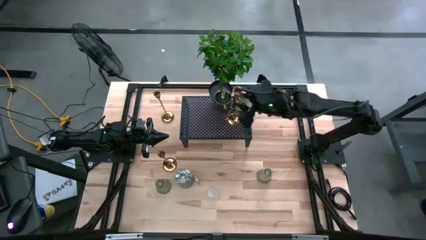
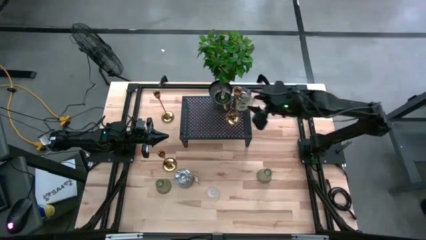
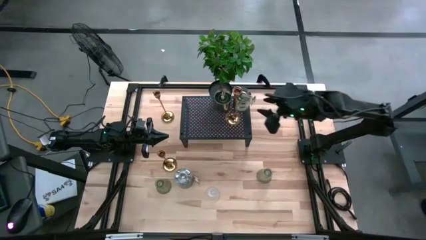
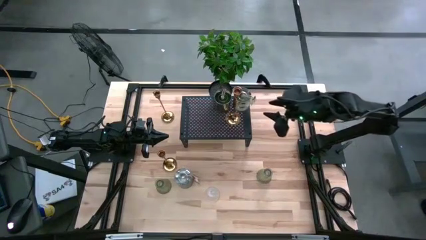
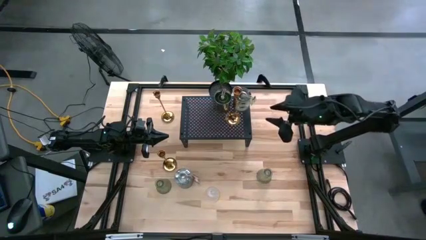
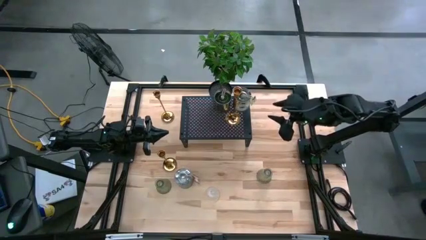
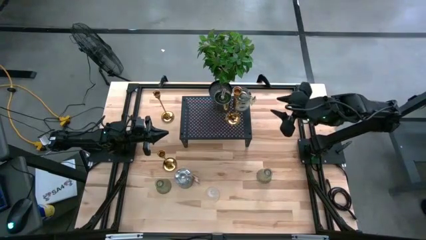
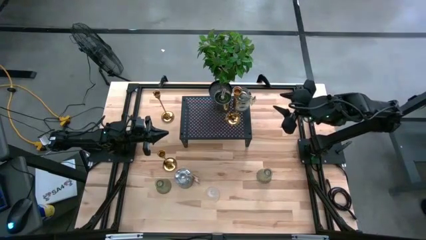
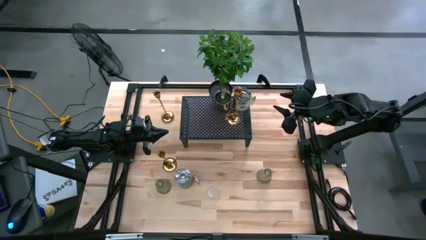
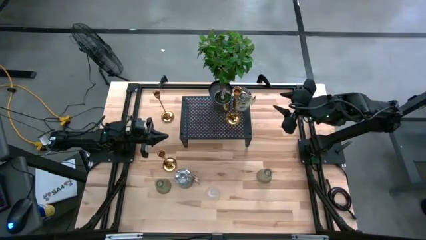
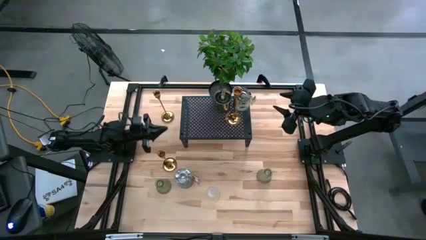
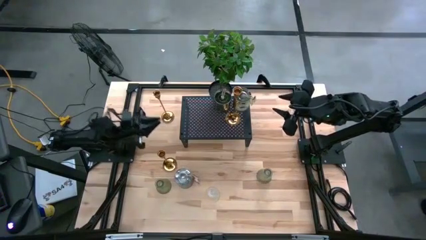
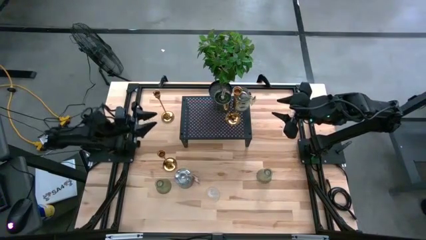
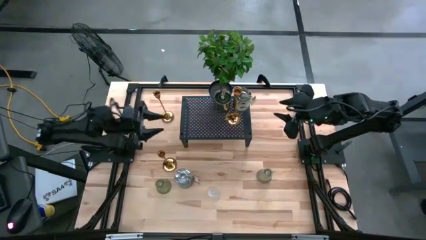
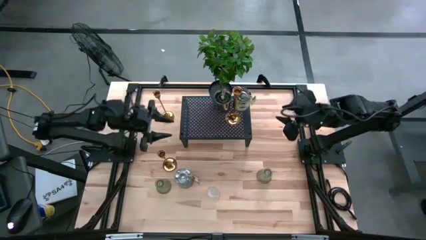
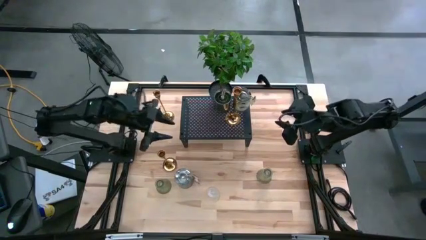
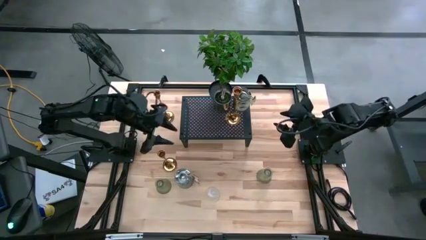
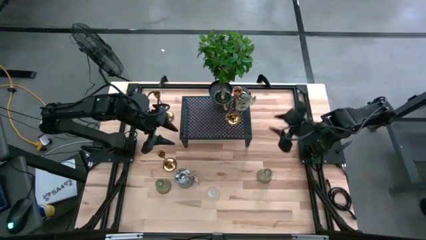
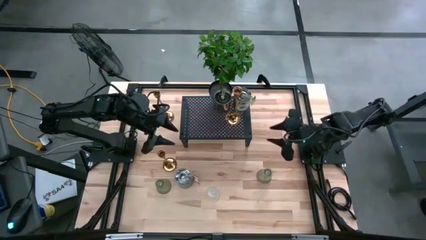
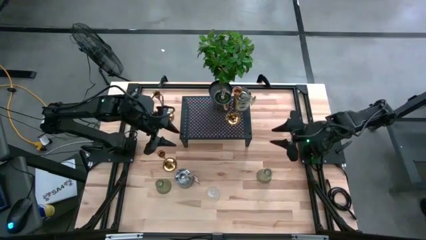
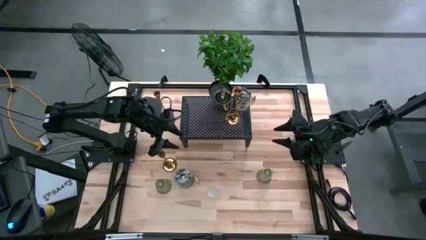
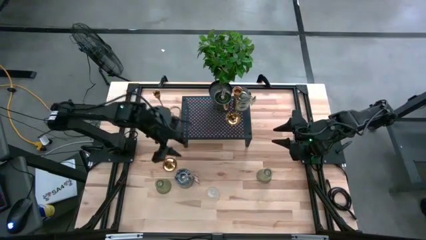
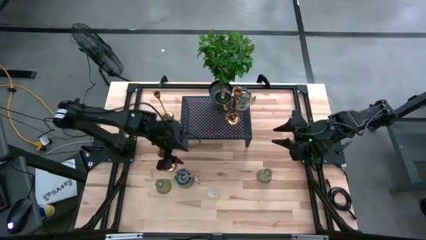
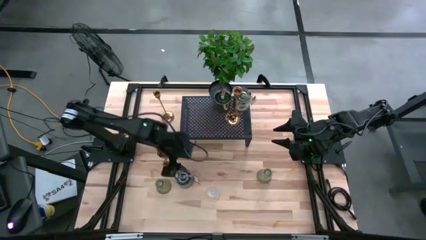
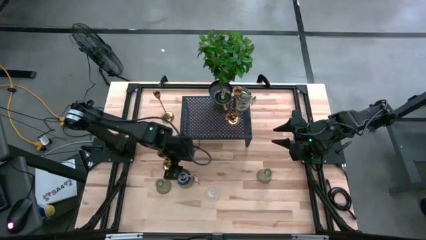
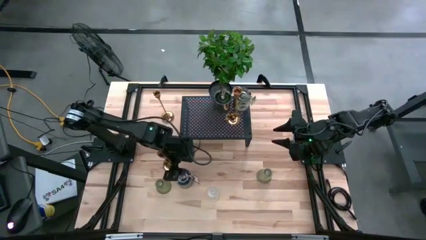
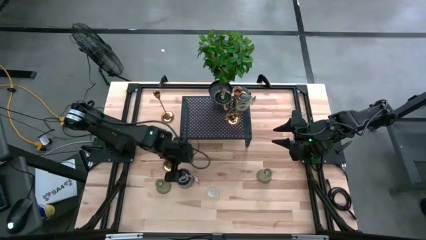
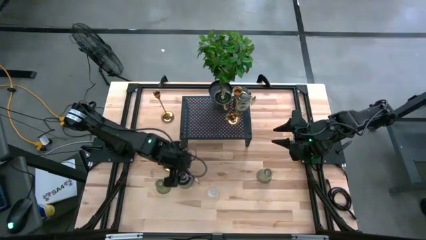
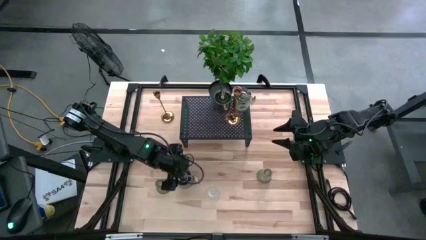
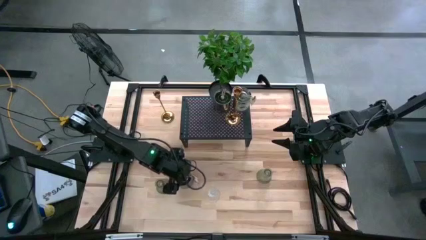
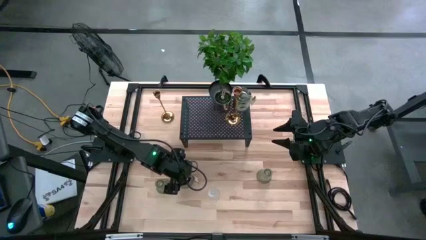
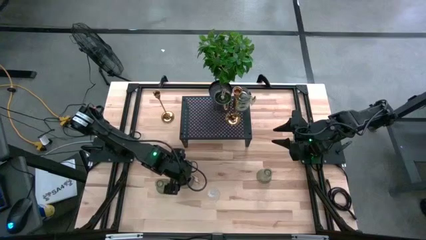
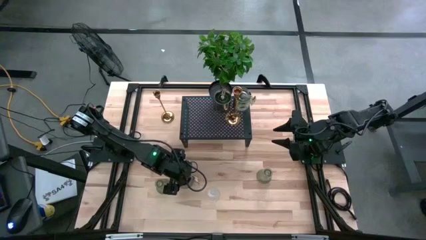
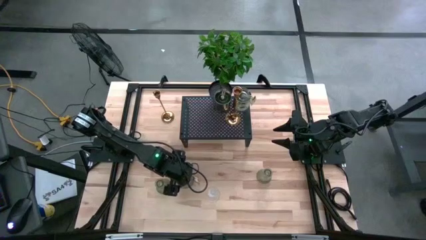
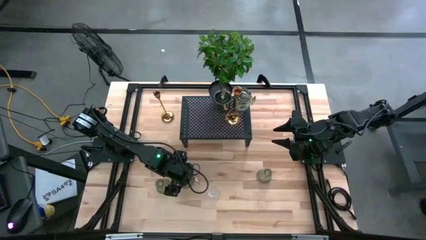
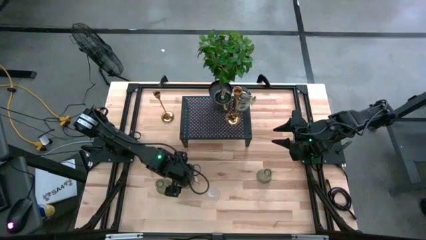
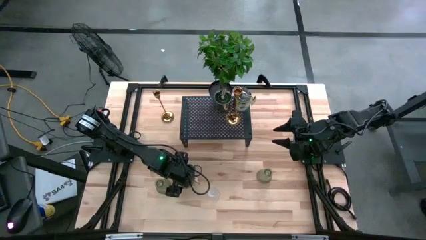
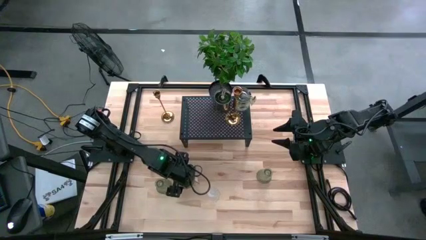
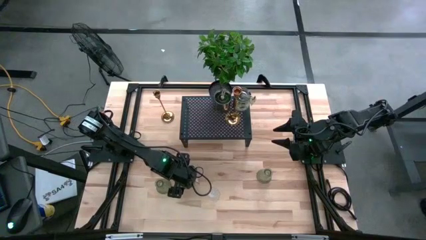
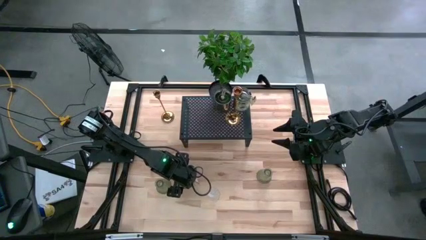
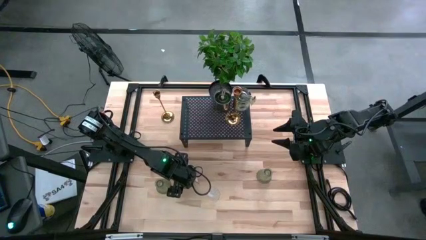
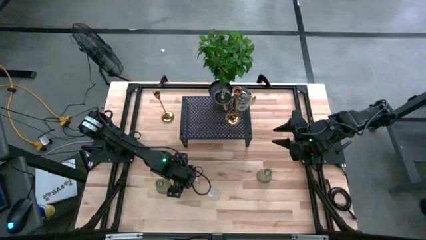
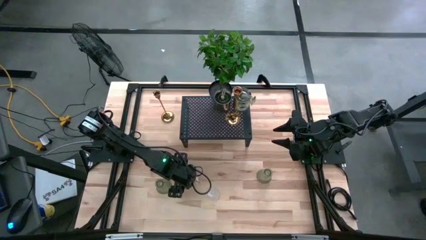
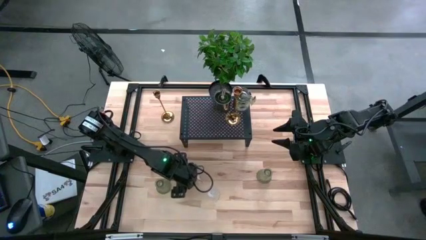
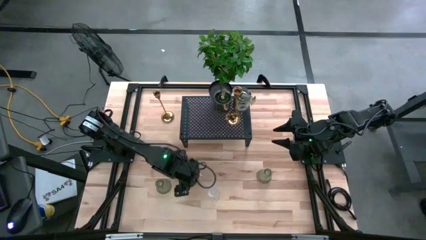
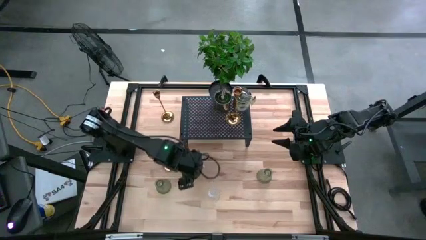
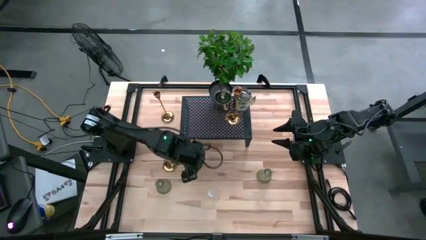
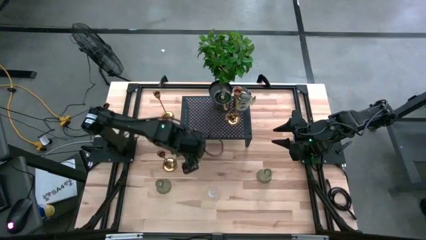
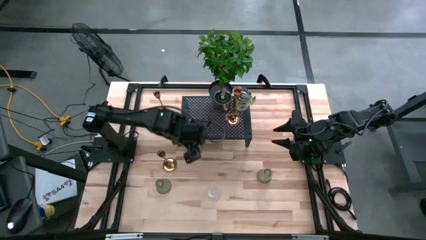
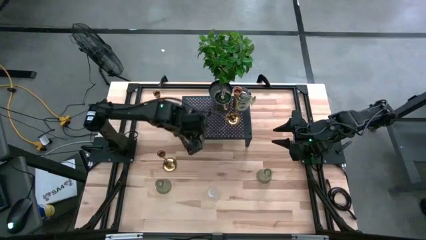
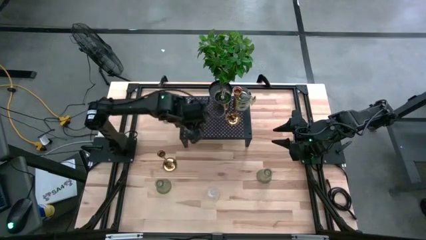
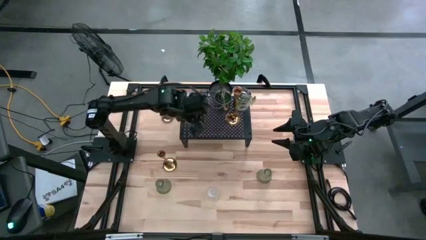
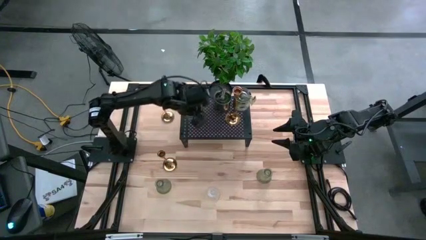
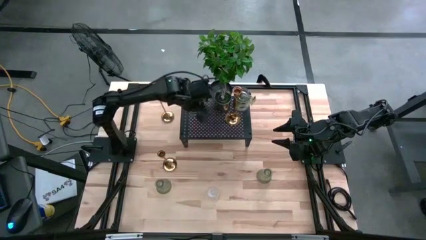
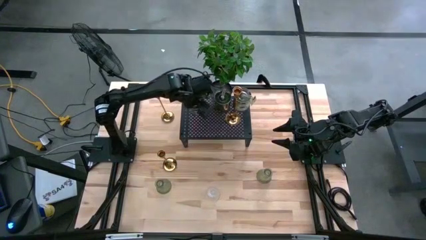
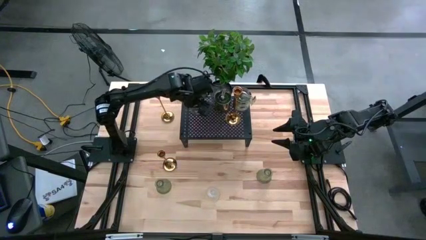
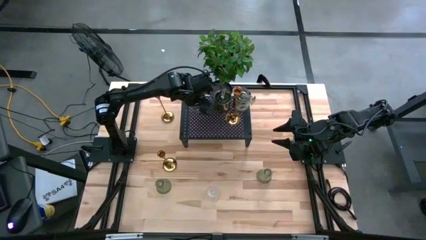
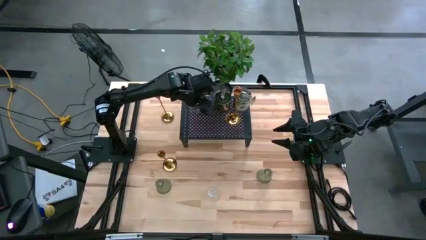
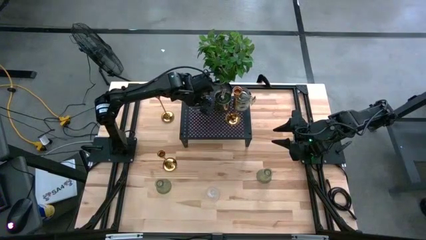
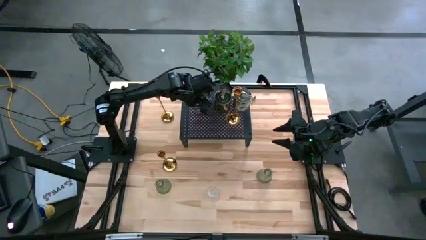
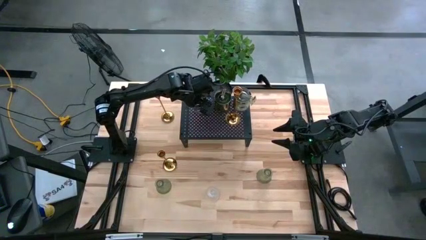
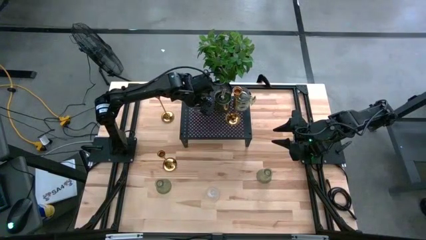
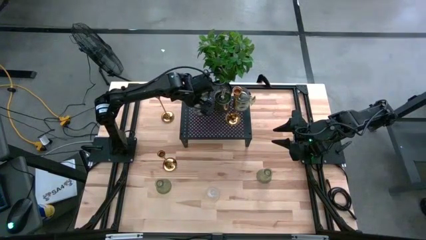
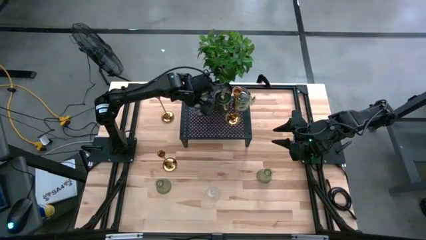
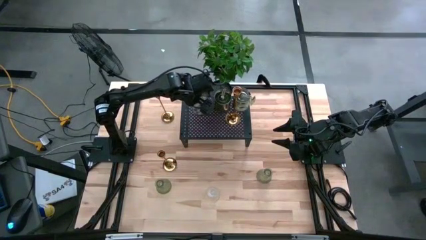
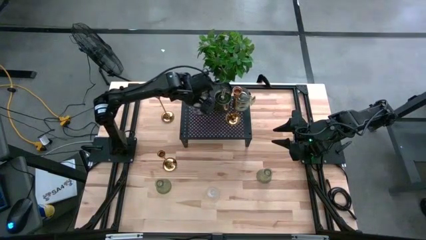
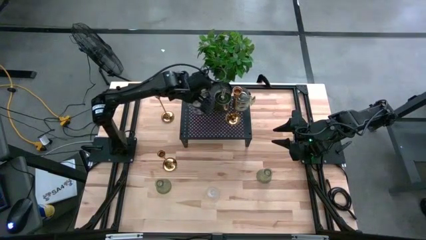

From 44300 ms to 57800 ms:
Task: Pick & Place candle stick holders
Put the silver scented candle on the shelf aligned with the other silver scented candles

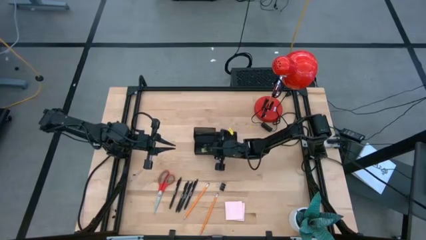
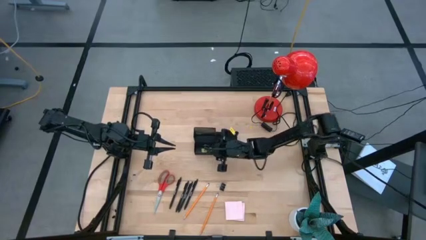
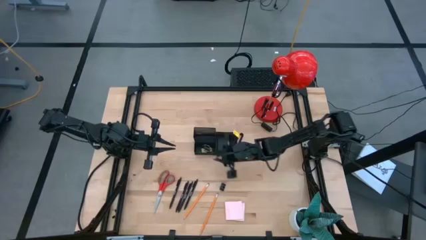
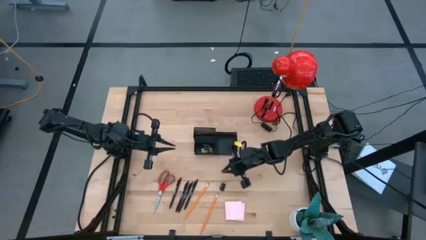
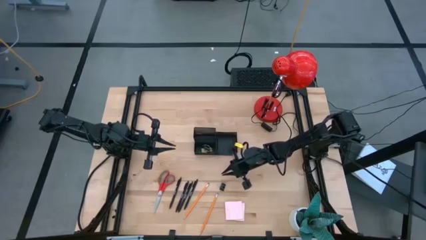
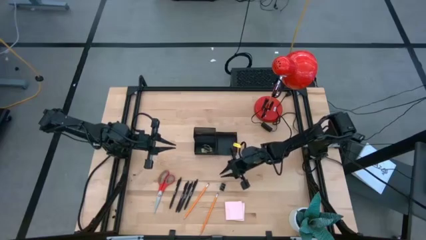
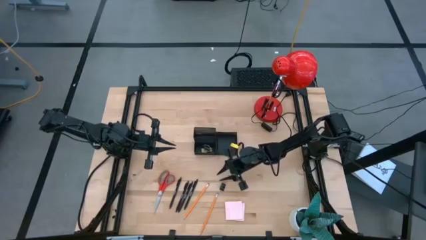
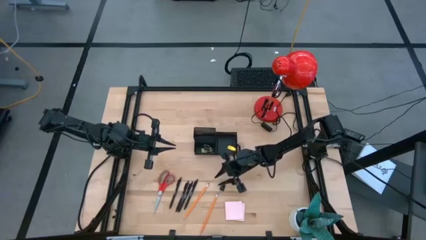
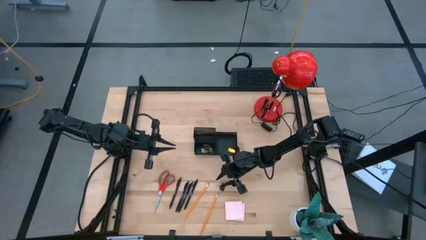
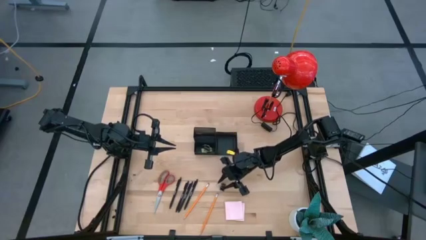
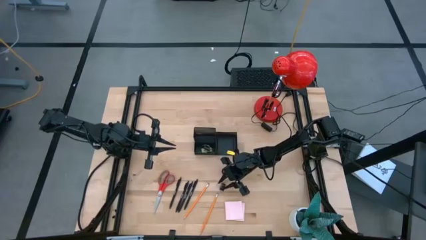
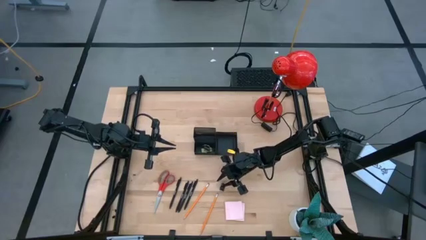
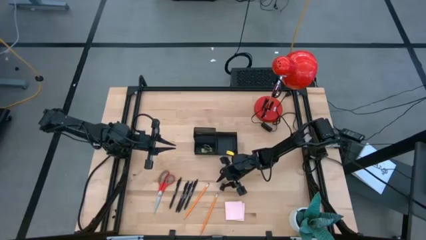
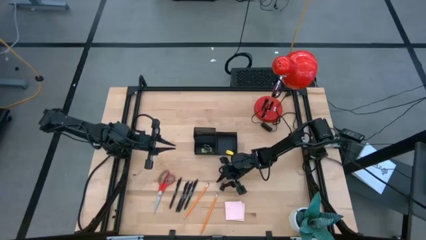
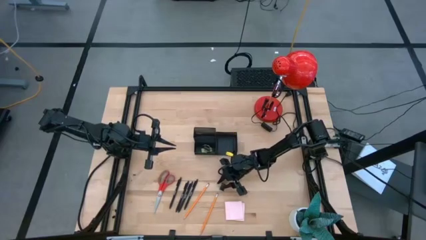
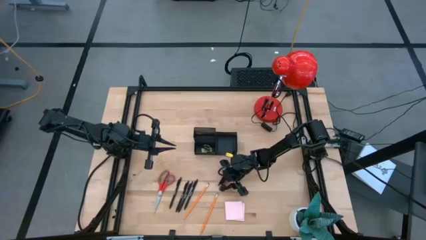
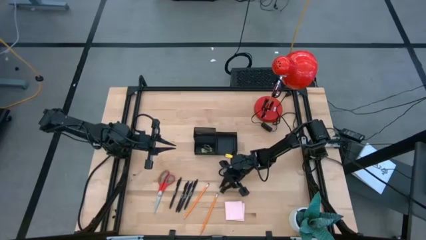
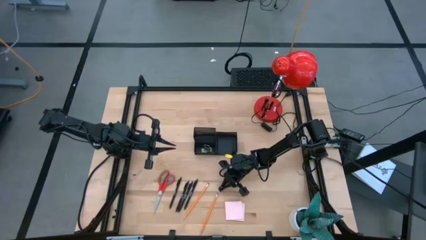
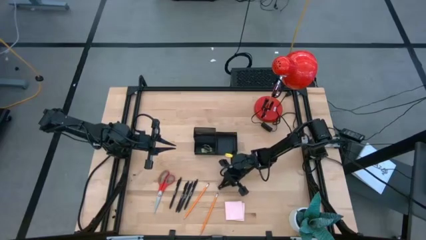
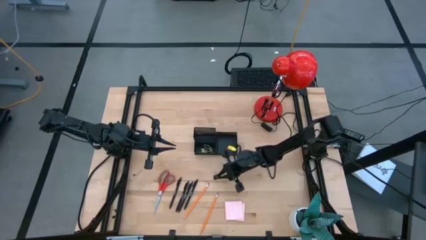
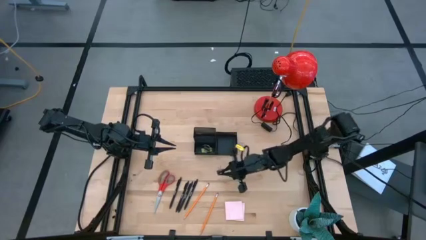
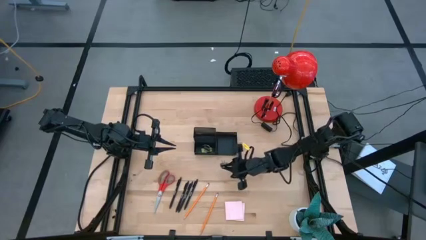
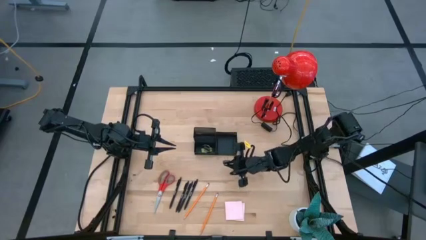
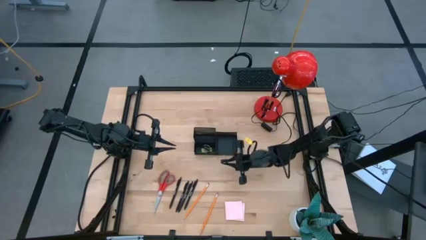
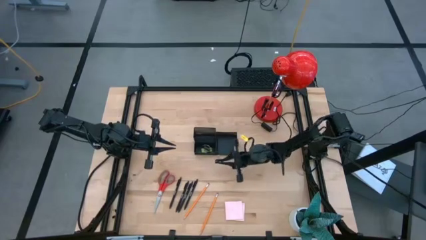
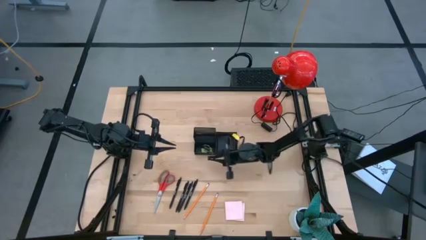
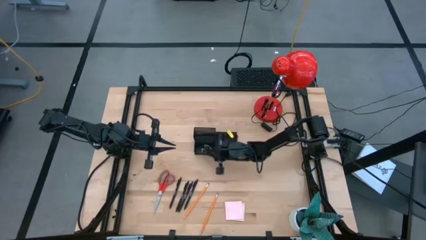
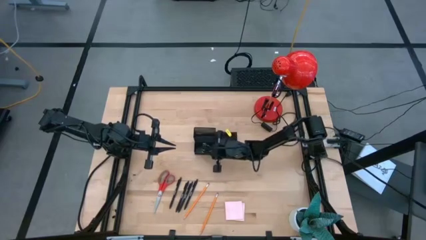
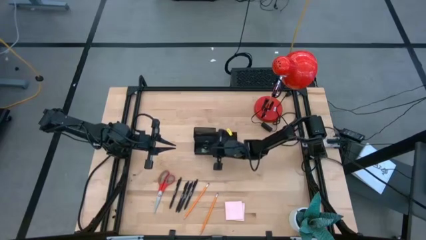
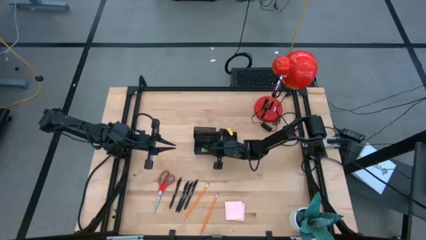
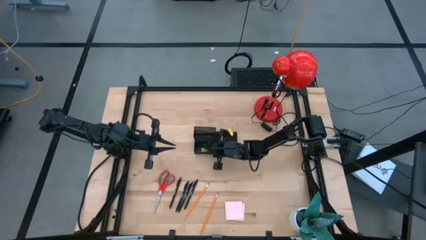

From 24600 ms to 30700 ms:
Task: Pick and place office supplies into organizer
Put the binder clip into the desk organizer
